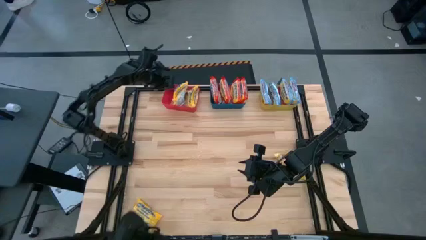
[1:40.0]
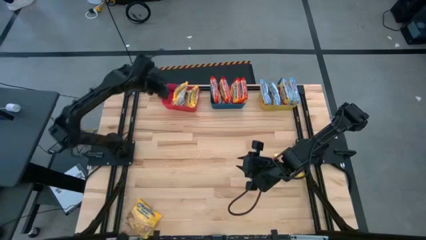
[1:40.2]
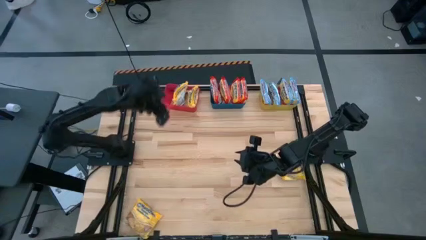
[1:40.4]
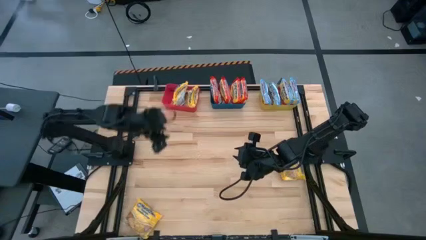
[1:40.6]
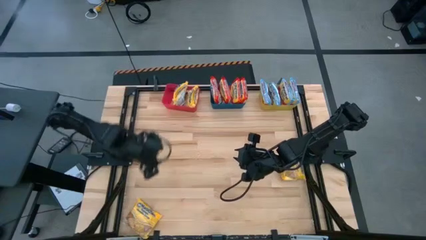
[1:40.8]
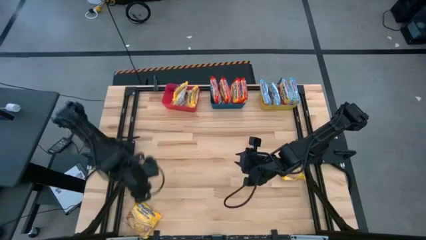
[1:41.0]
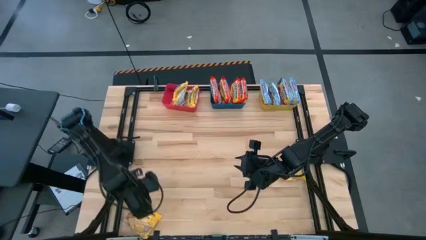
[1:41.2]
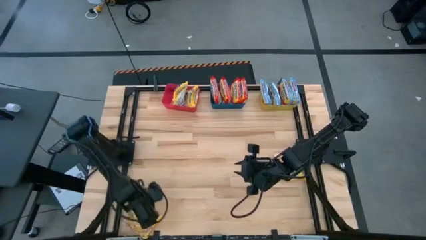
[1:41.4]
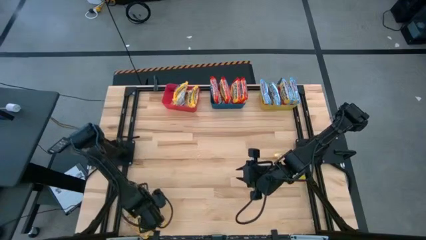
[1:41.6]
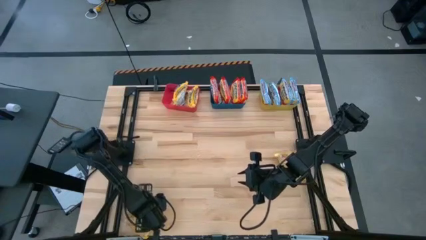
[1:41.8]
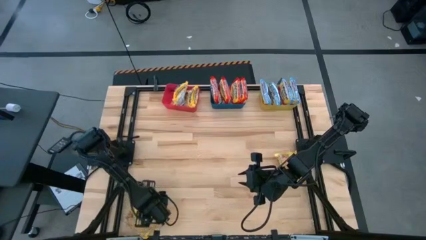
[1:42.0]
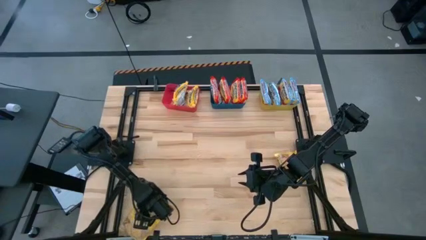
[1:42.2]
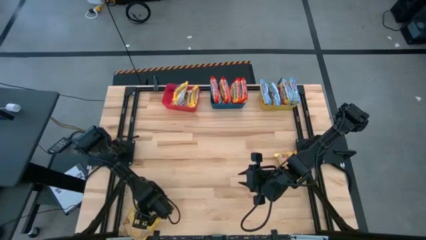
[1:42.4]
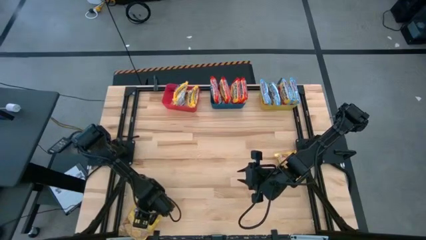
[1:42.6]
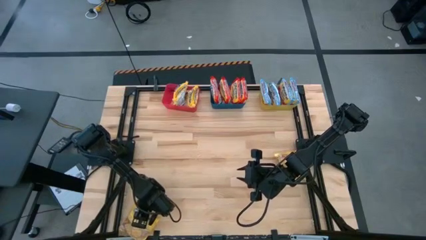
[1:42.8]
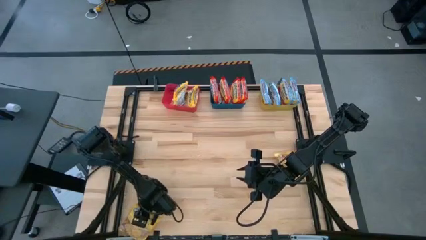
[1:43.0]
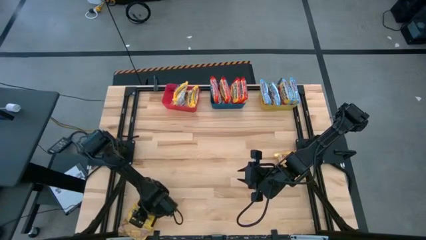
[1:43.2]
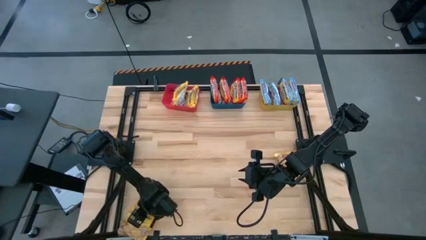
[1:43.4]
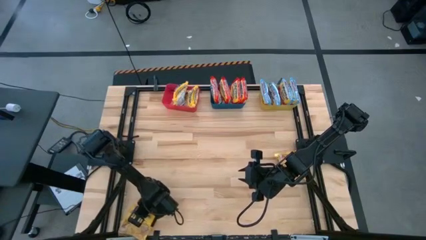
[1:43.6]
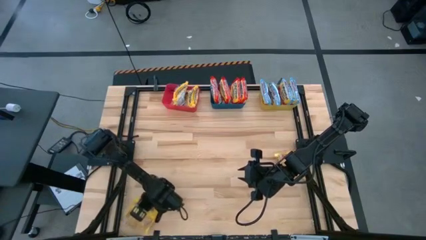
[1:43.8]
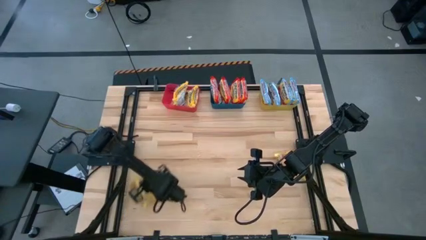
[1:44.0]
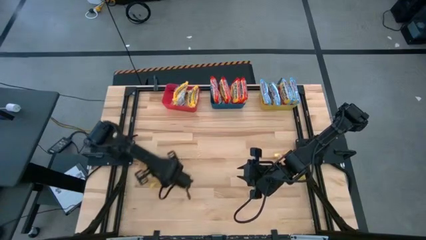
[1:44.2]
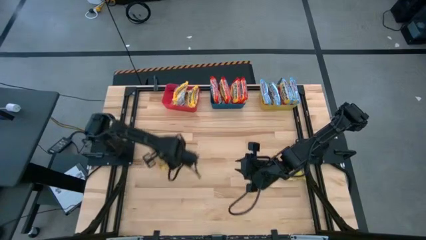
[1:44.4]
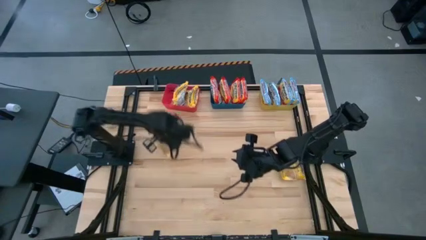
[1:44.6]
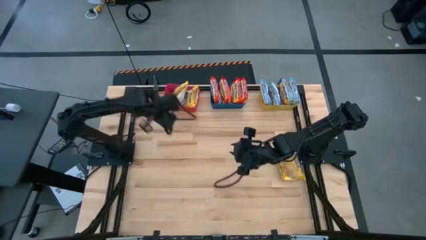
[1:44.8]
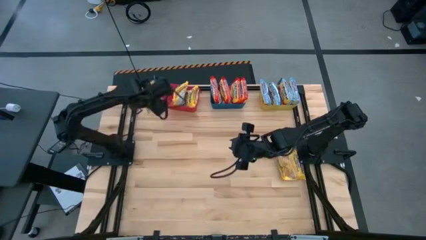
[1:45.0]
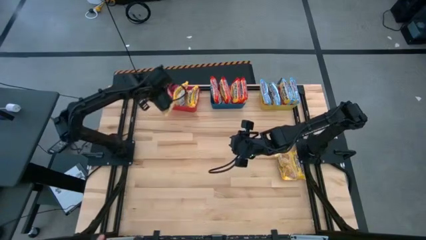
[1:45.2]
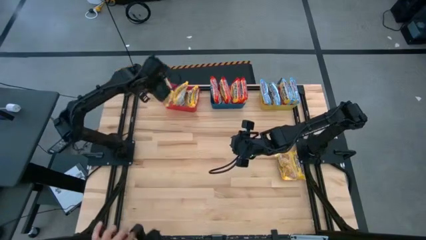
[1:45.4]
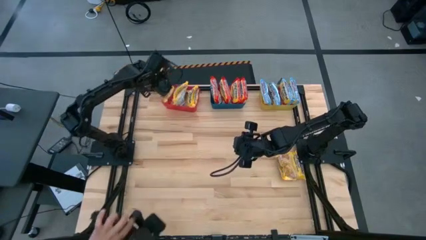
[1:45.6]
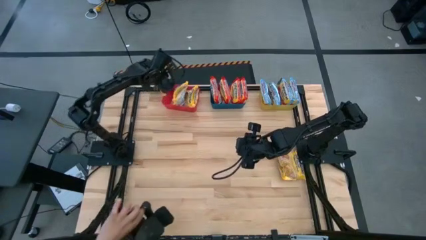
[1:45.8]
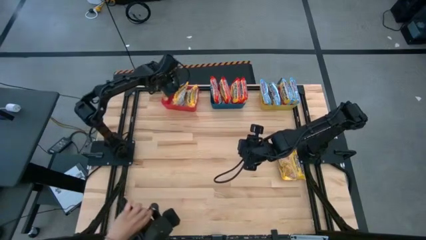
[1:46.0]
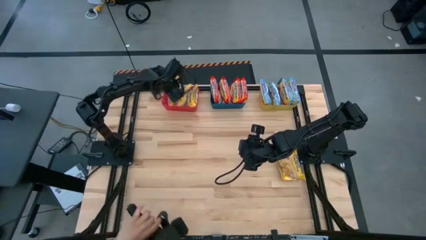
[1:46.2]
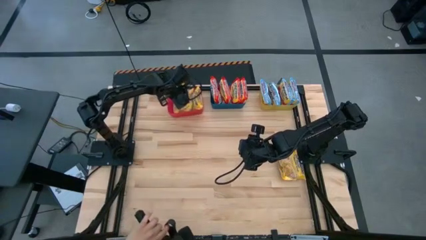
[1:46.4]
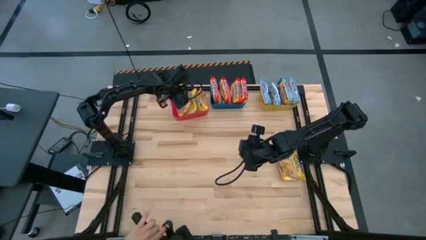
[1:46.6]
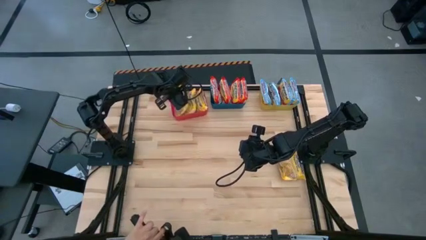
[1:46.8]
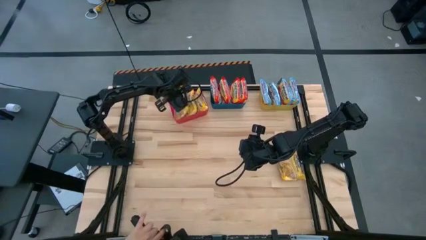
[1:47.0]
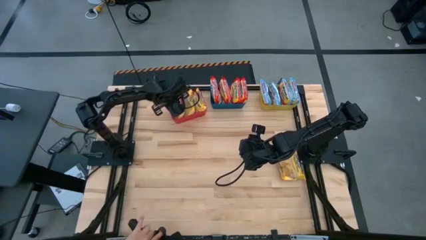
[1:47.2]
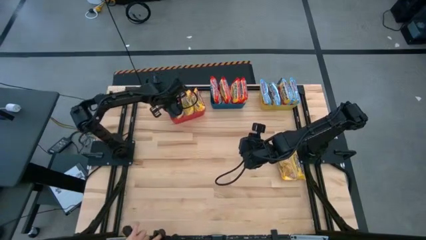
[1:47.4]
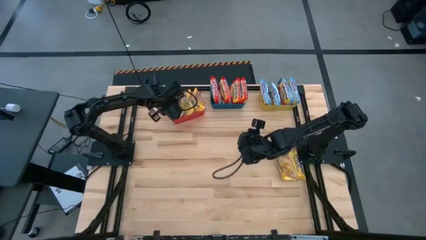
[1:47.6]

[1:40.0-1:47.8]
Task: Sort Maruchan noodles
Put the yellow noodle pack into the red bin

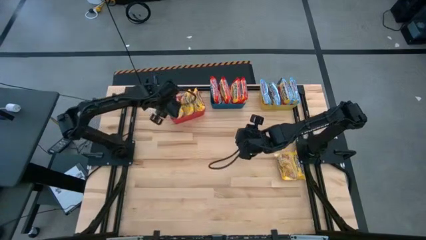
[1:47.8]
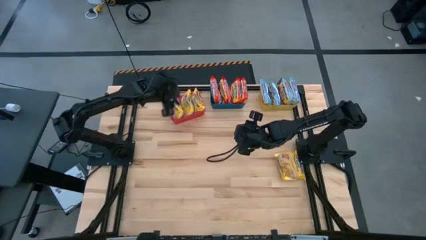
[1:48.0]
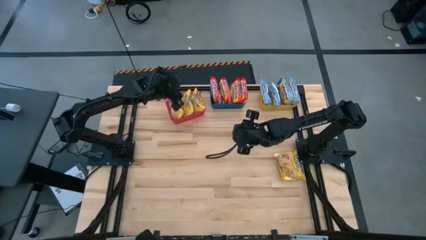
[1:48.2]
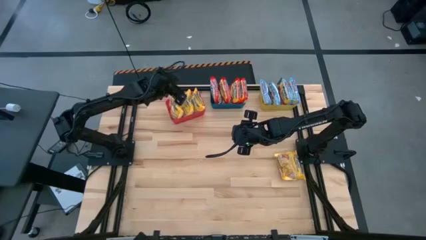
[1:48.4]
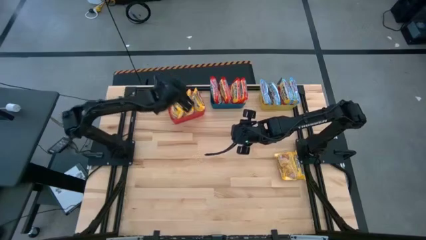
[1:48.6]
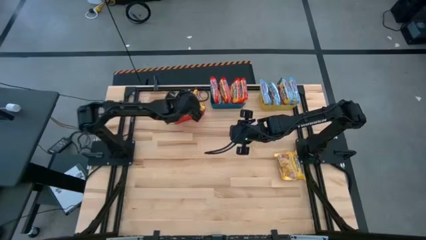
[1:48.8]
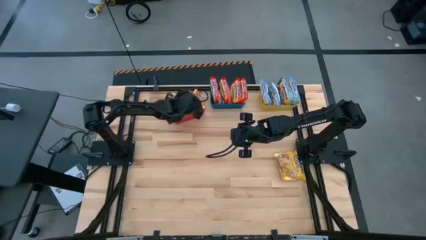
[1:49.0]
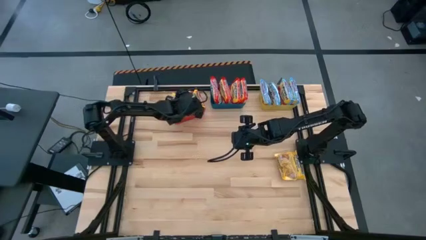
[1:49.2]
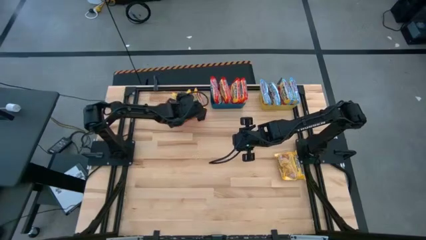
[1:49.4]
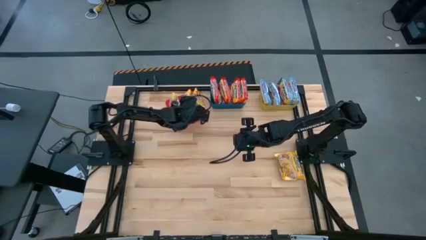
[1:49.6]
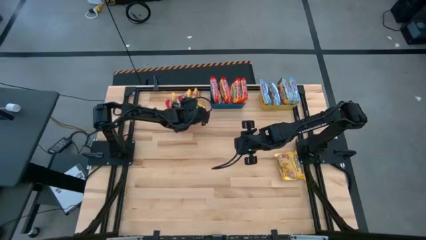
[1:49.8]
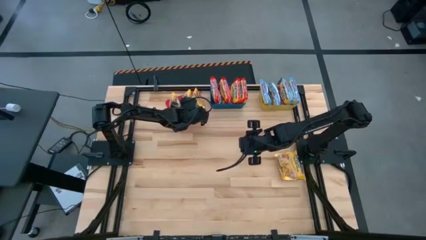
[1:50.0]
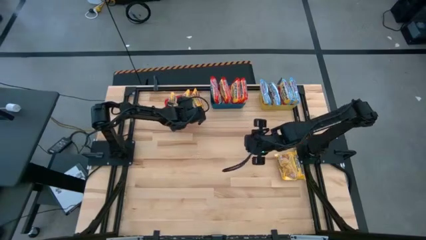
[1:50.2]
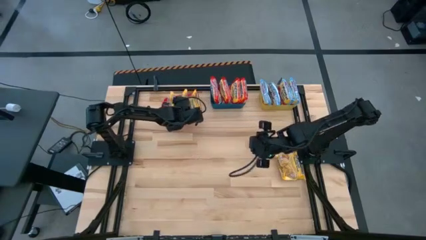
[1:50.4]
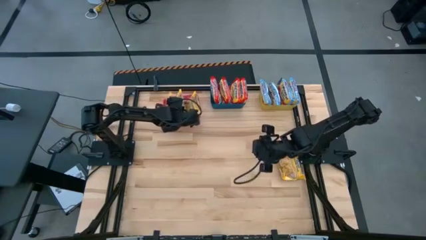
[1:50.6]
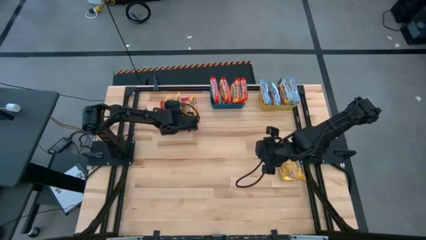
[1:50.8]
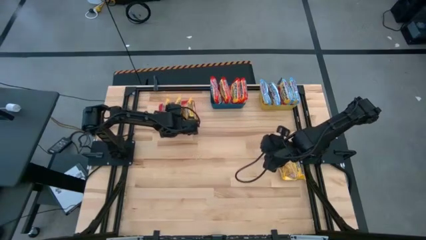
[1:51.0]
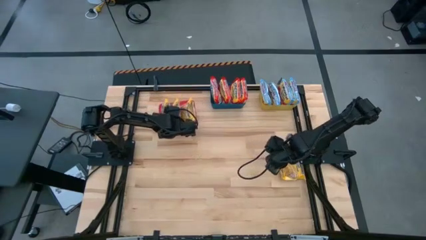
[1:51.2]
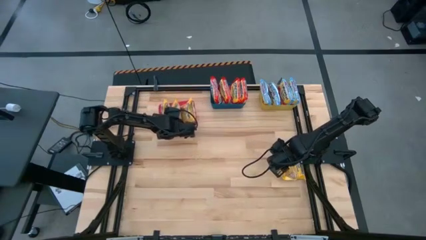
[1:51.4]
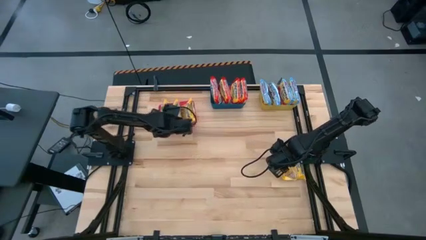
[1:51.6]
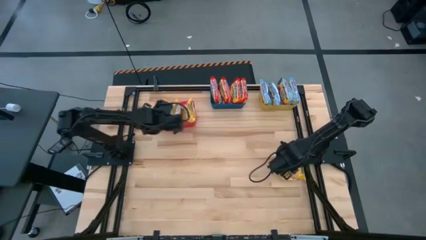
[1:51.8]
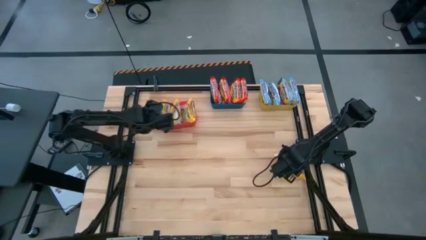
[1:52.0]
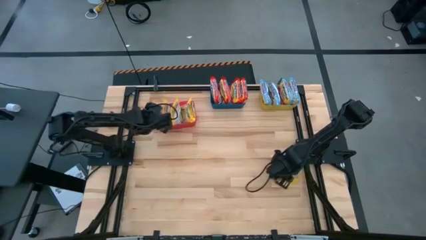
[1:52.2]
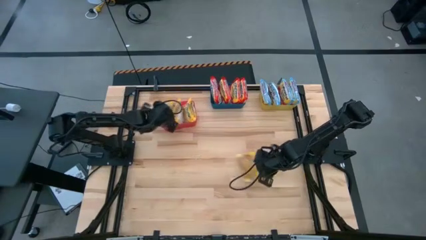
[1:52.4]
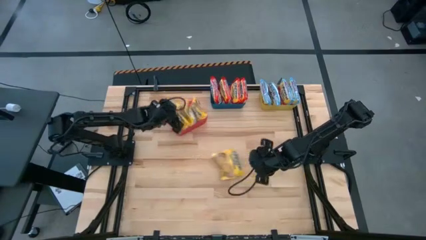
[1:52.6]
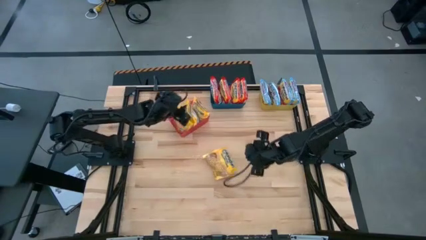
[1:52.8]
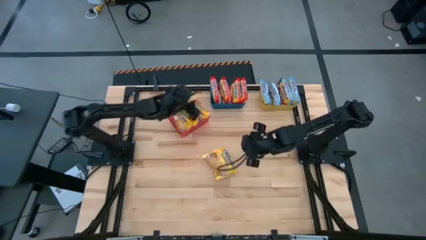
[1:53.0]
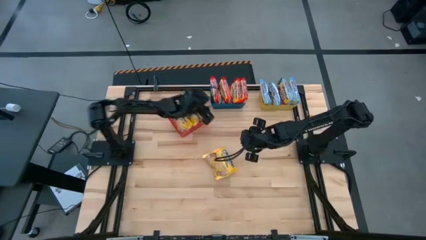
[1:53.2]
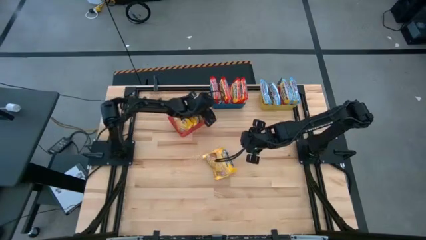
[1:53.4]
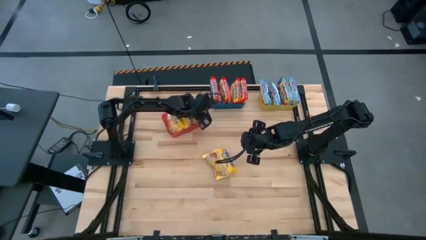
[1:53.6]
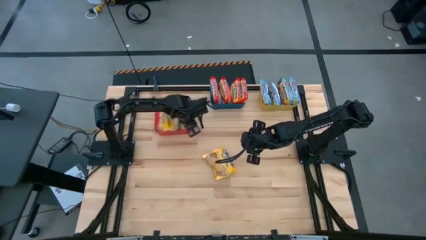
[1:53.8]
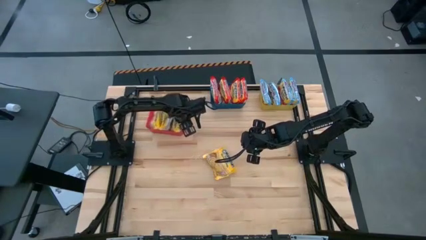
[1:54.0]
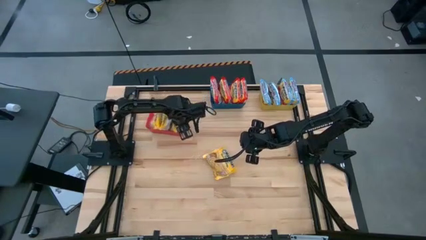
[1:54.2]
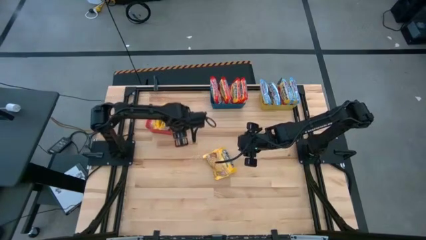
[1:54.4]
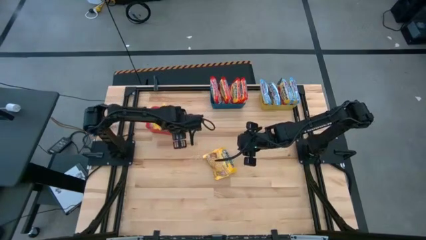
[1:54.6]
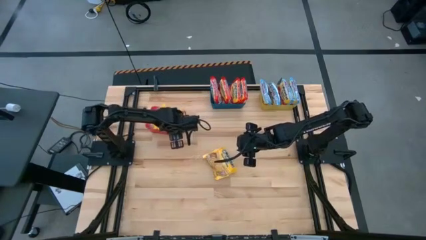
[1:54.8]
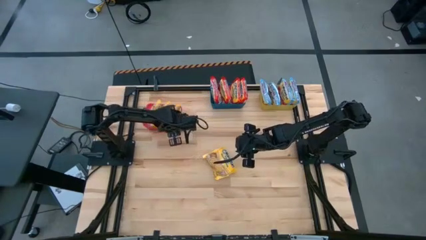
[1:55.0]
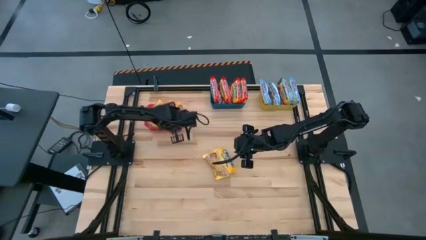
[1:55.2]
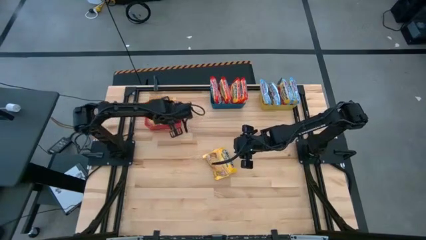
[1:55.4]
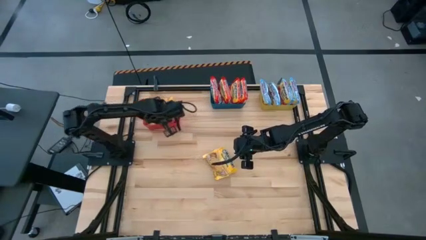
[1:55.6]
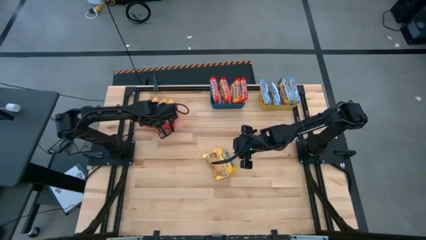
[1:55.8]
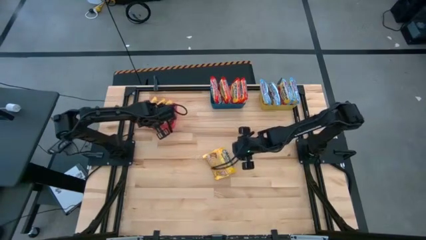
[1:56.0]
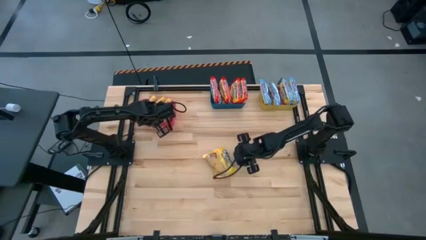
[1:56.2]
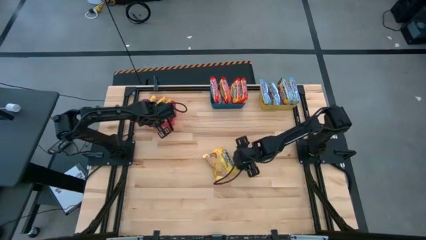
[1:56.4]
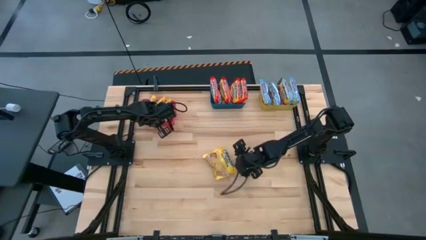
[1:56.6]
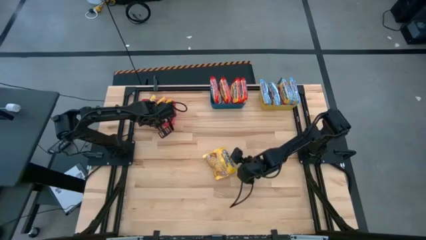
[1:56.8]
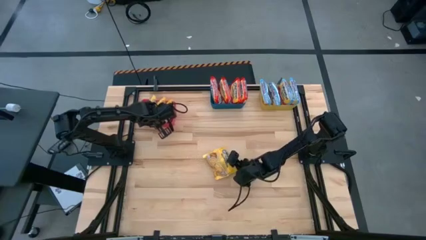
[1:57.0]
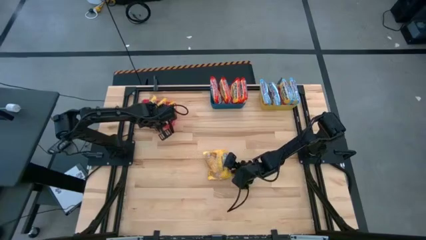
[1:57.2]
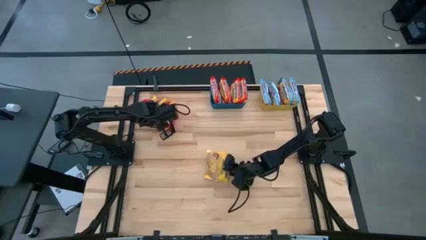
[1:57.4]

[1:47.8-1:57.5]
Adjust the yellow noodle packs on the red bin
